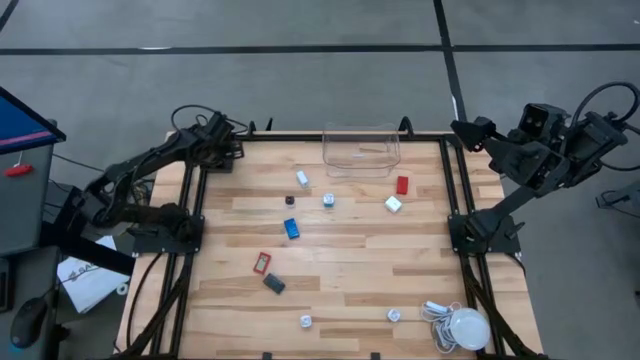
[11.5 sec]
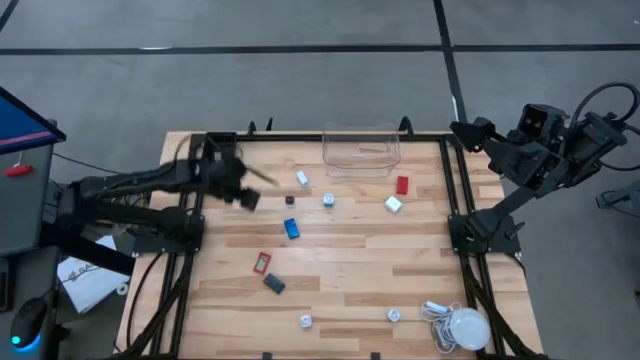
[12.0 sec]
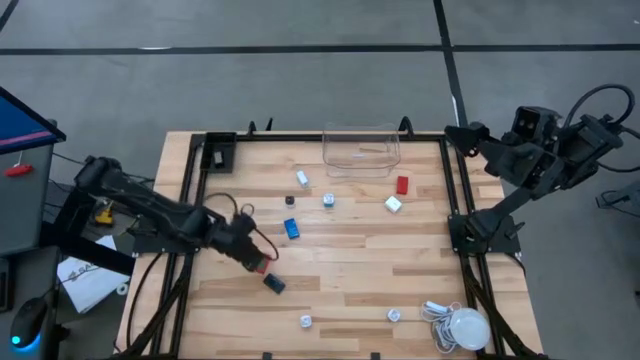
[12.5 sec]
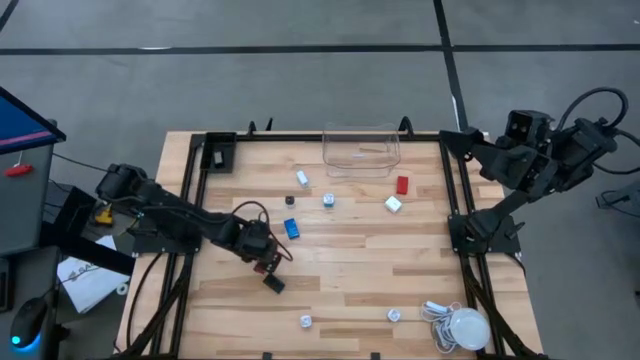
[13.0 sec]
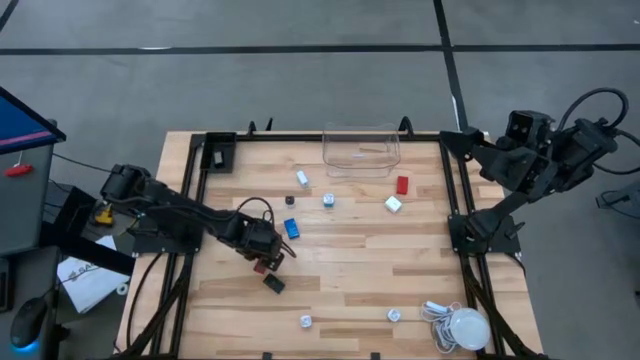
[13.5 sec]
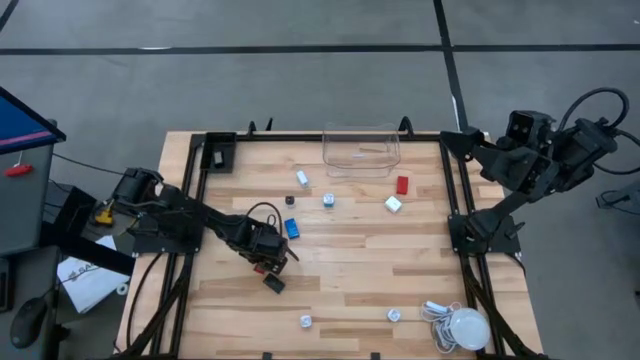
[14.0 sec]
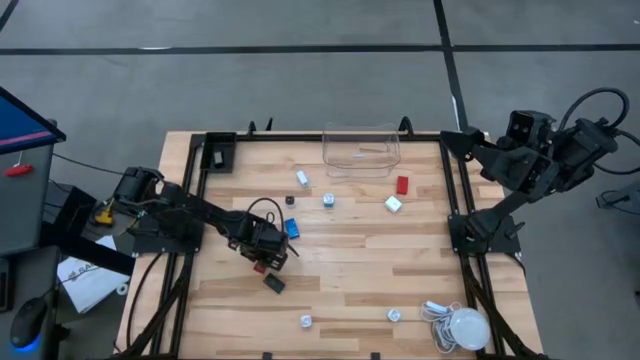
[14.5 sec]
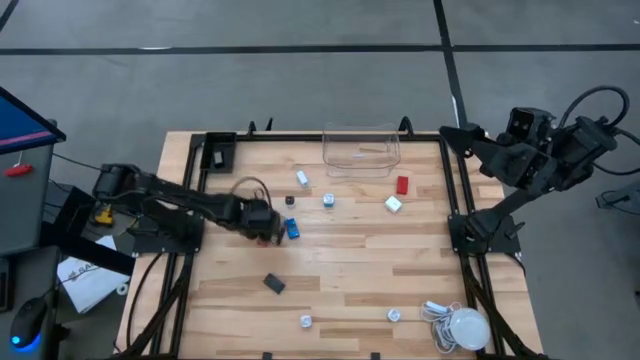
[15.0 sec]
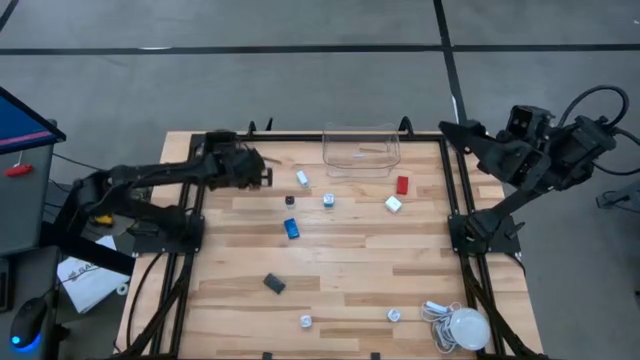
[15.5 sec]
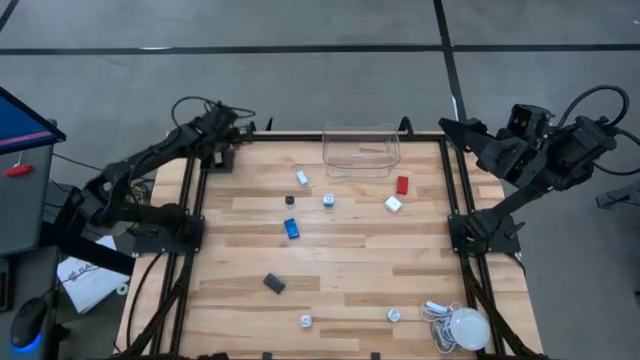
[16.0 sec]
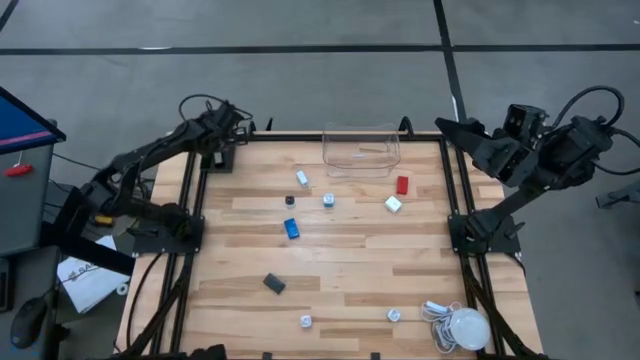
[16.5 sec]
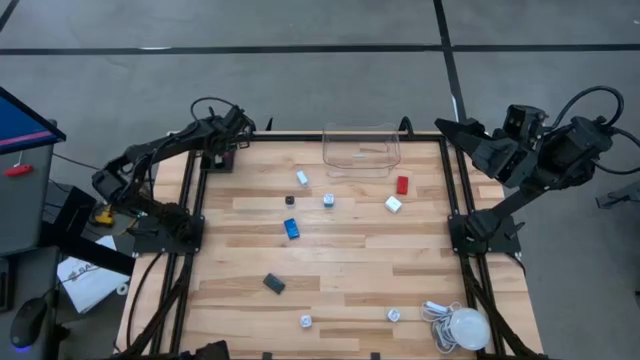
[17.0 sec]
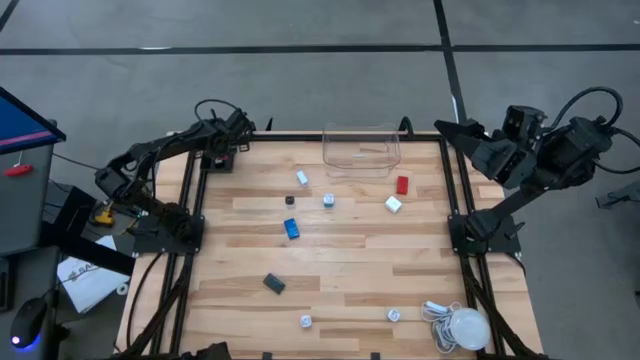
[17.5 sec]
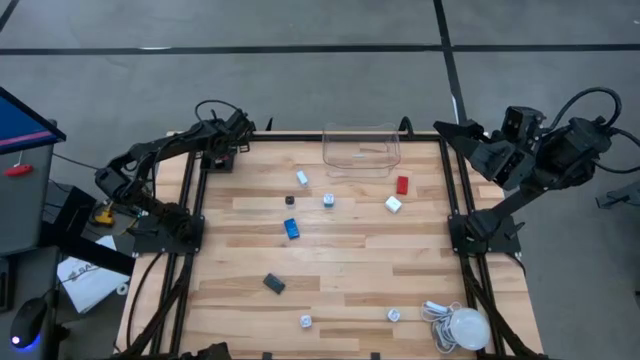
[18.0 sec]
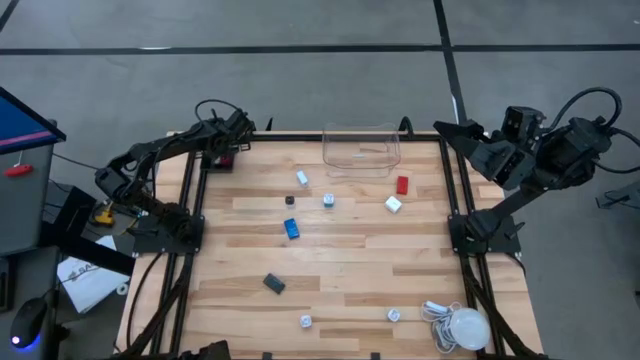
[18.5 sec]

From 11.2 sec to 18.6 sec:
Task: Pick & Place Office items
Put the left red digital clock into the black basket

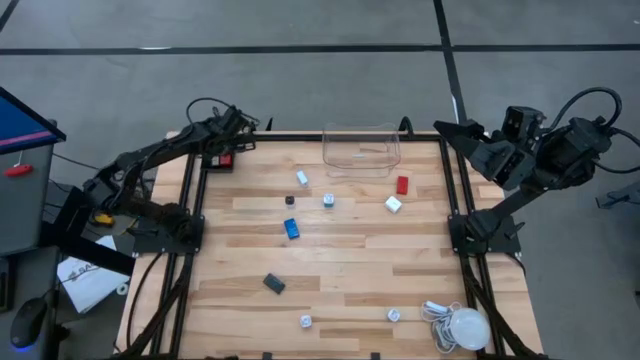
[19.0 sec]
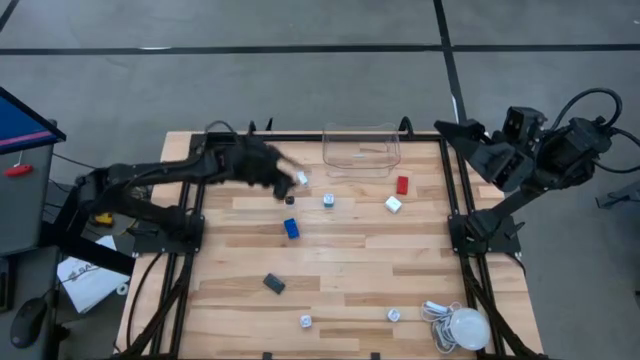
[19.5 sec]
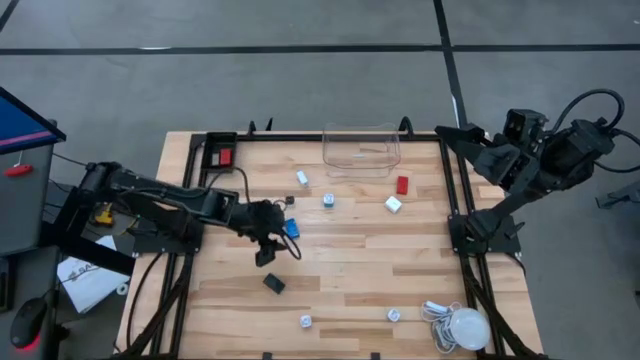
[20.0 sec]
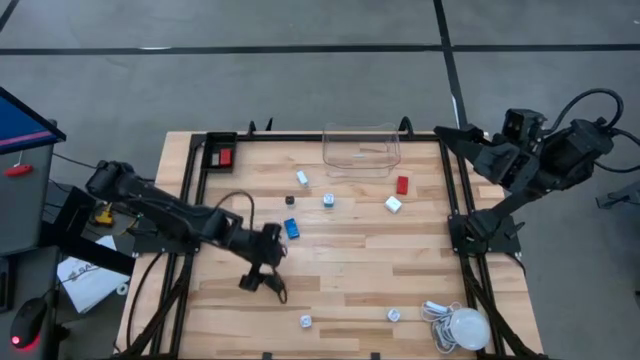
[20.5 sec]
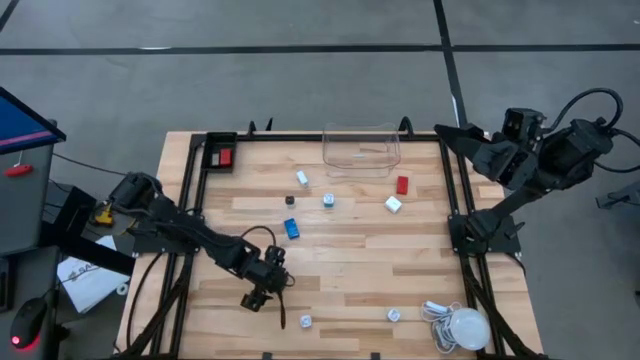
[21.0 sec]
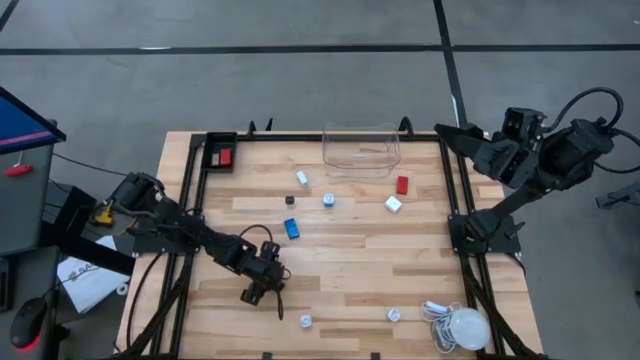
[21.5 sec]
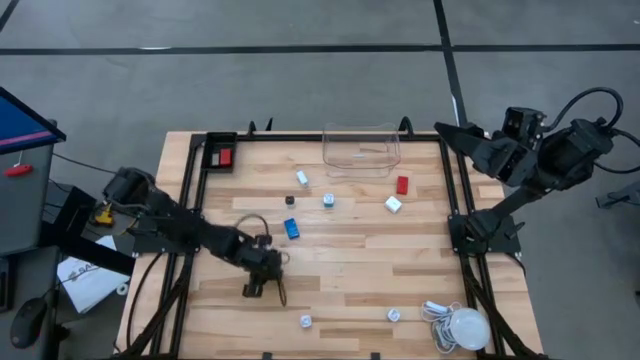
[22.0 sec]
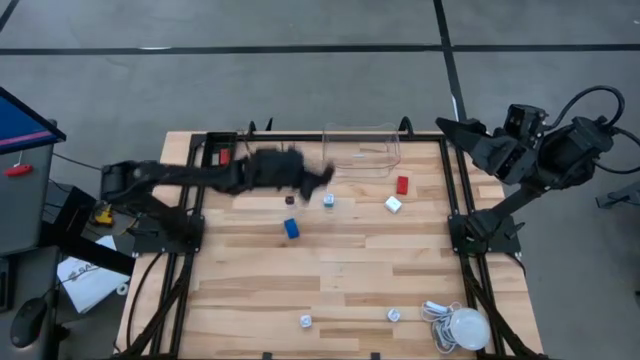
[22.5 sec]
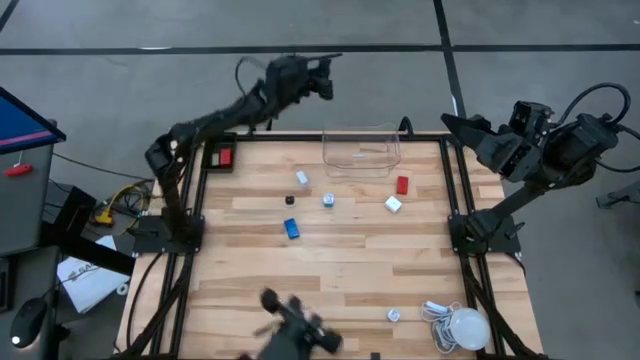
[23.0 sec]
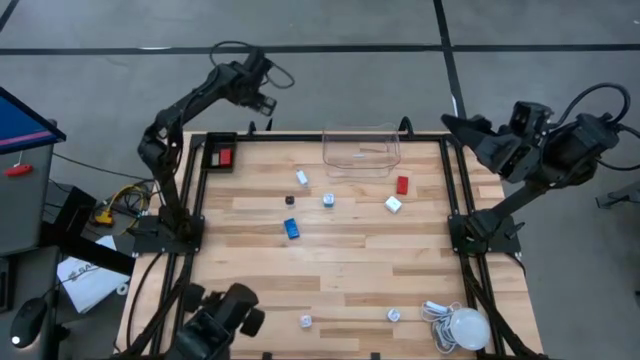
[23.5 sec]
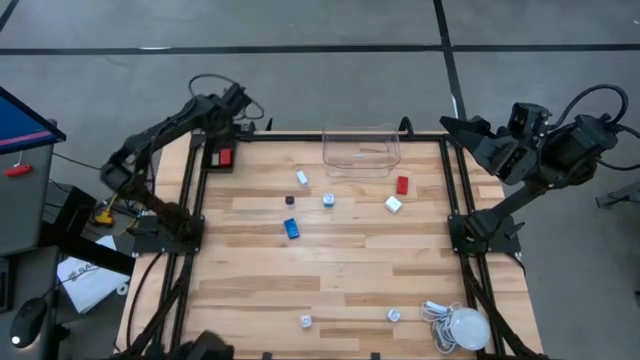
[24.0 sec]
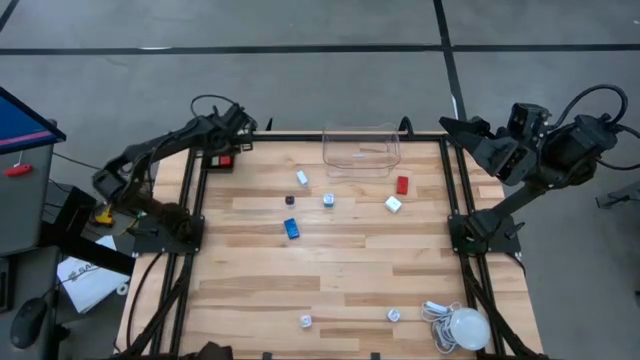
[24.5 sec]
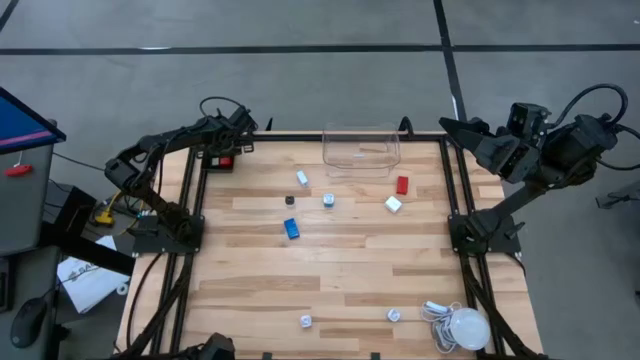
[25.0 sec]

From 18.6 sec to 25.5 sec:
Put the black digital clock into the black basket

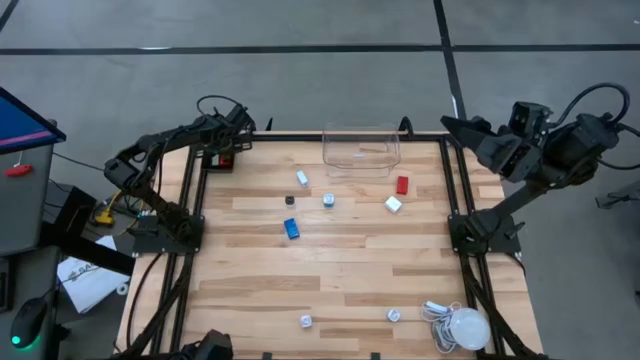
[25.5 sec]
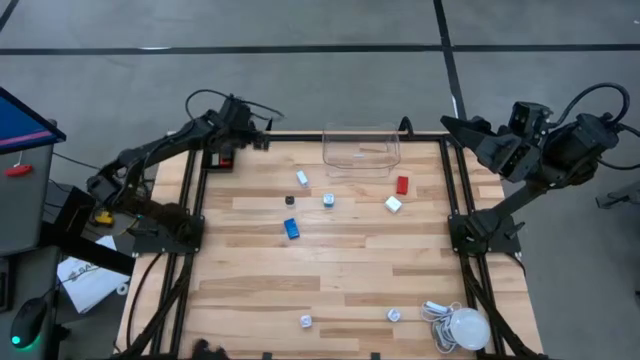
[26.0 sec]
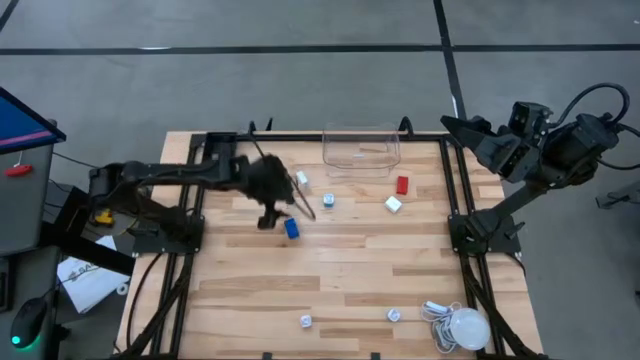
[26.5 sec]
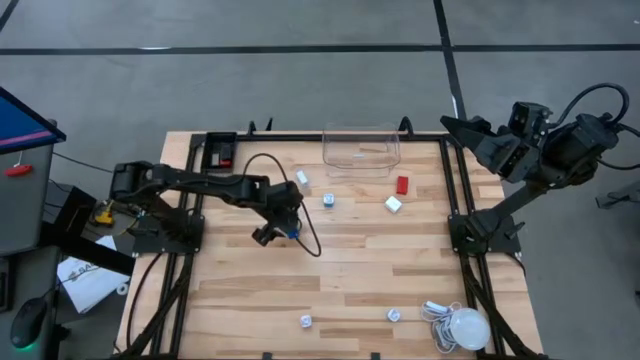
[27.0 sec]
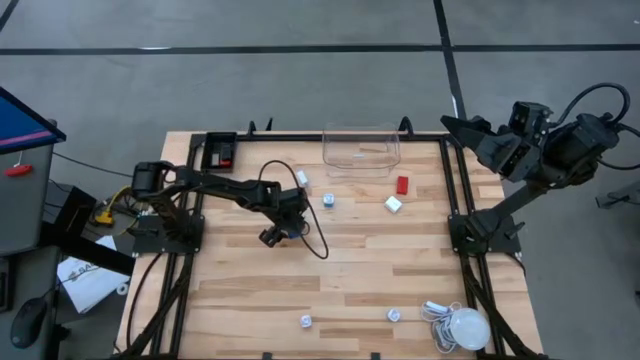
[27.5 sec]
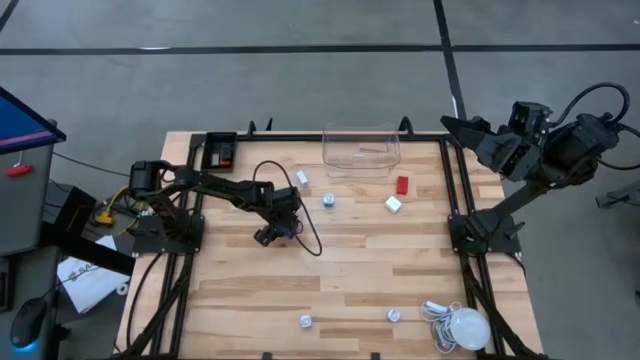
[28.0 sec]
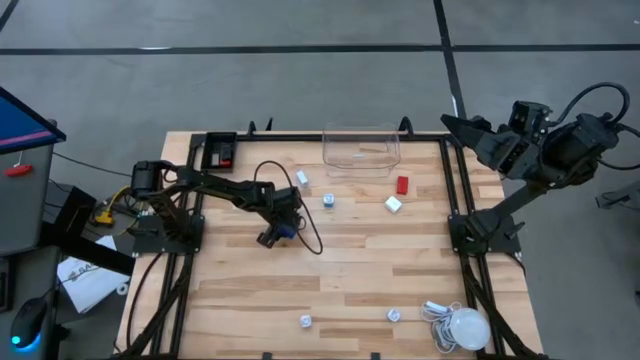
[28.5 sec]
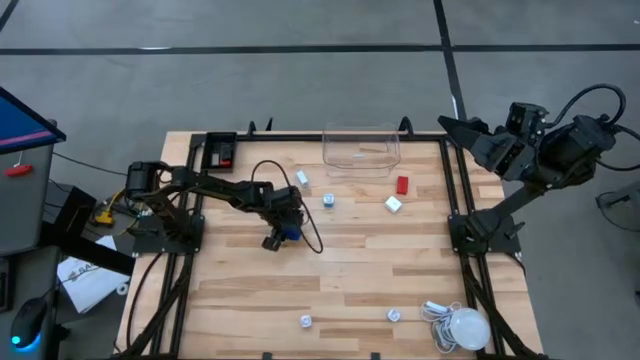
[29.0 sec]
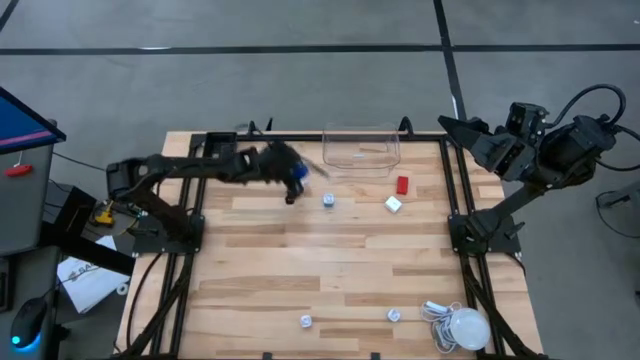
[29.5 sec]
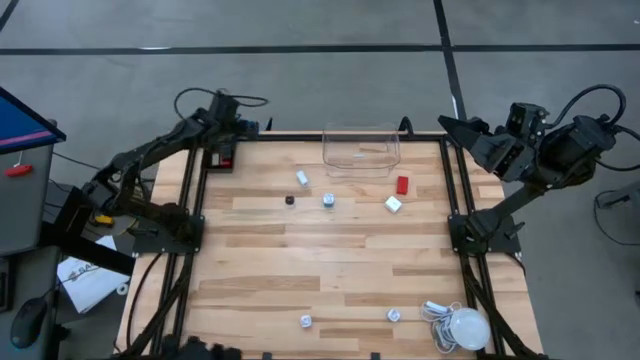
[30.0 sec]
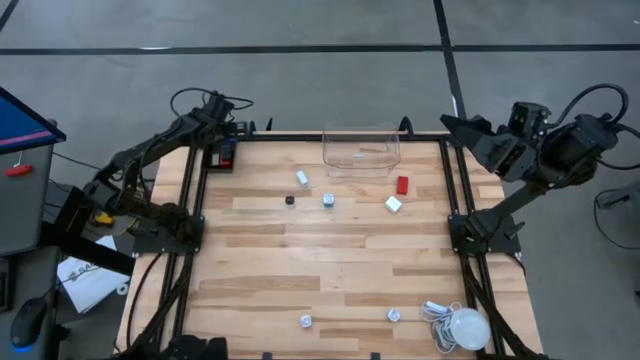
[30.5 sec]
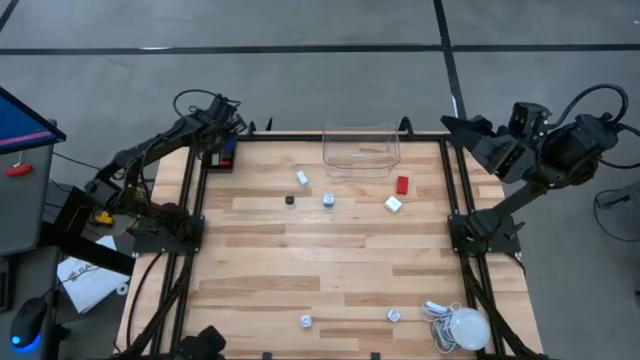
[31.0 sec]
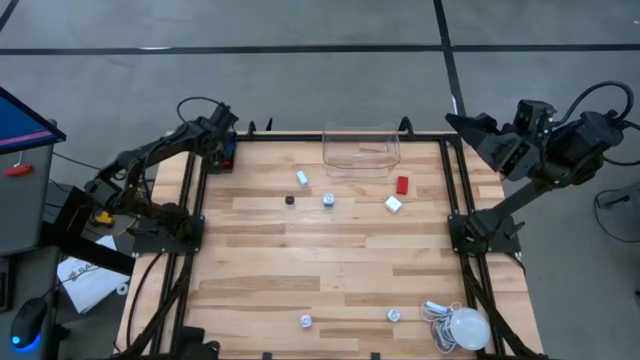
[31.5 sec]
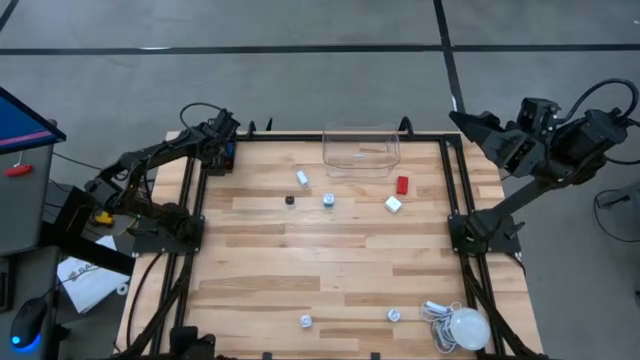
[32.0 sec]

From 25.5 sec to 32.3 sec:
Put the blue digital clock into the black basket
